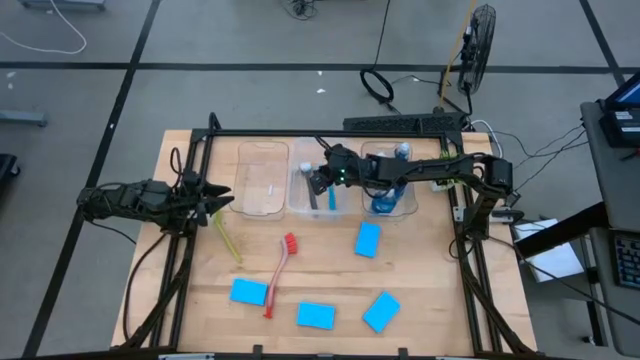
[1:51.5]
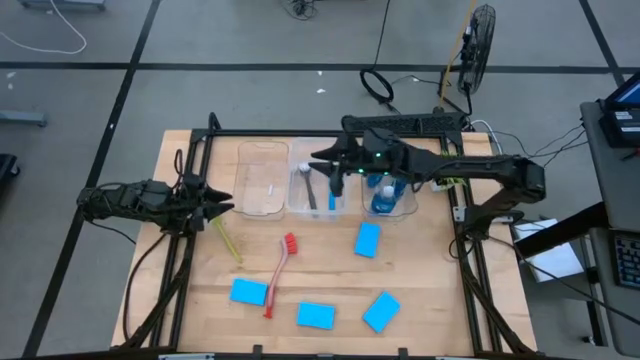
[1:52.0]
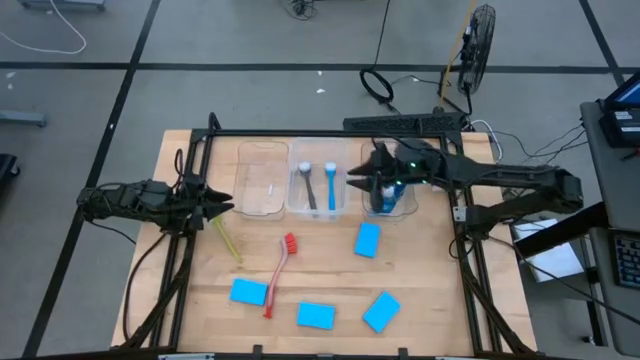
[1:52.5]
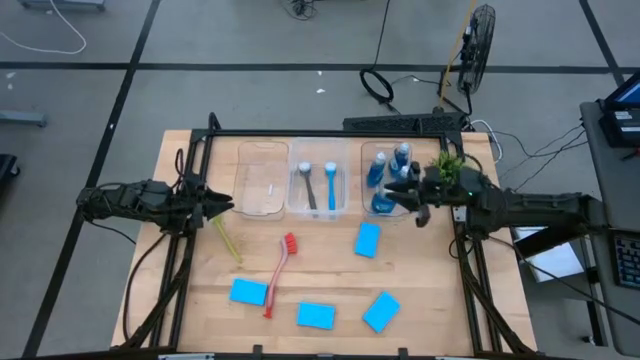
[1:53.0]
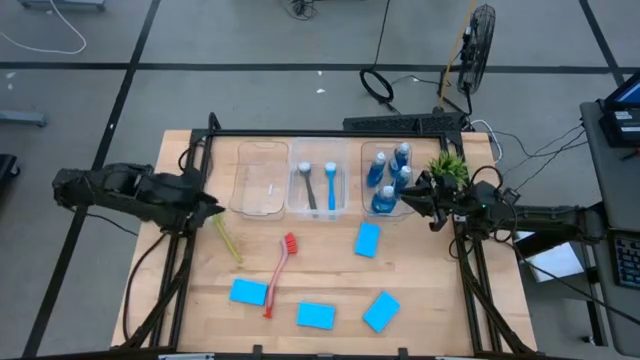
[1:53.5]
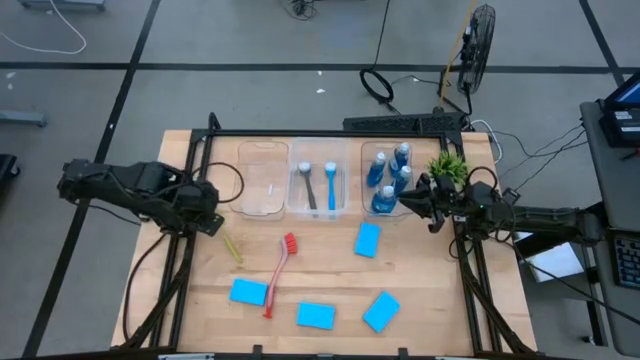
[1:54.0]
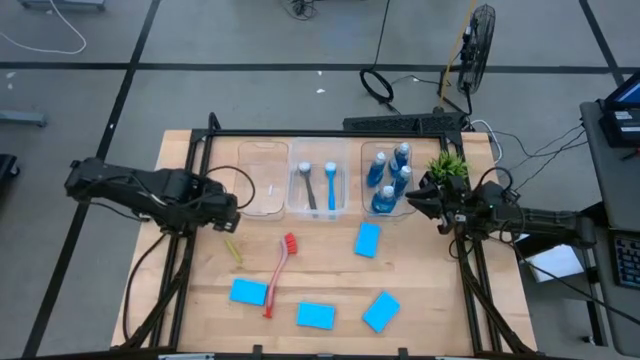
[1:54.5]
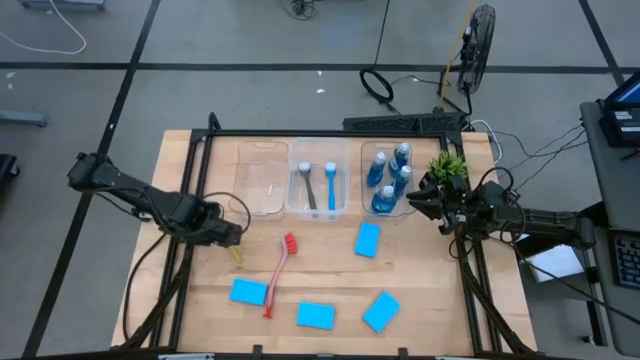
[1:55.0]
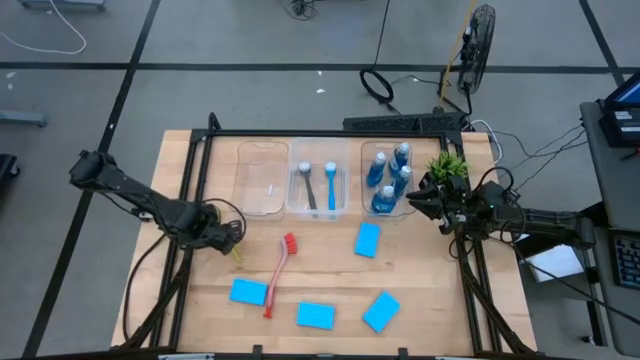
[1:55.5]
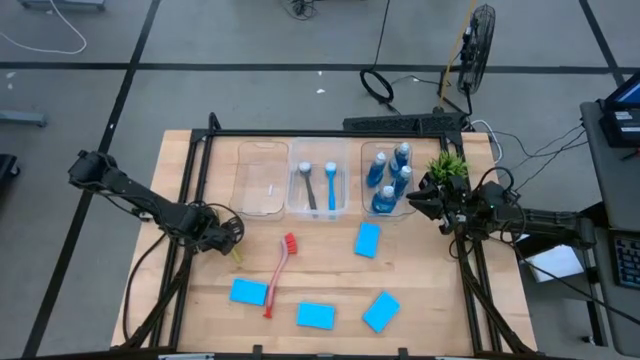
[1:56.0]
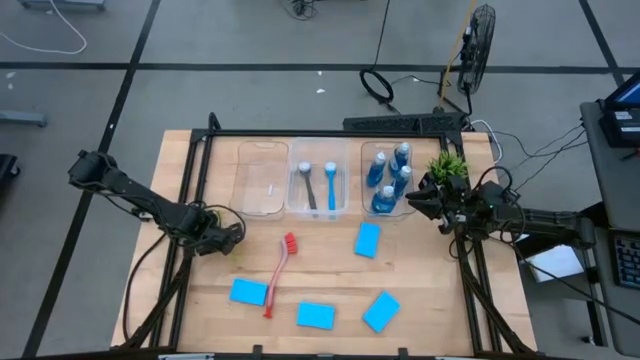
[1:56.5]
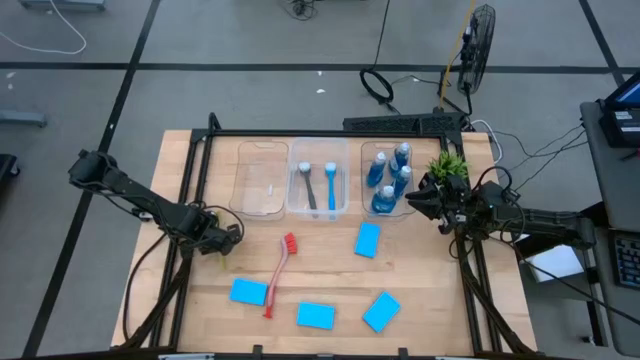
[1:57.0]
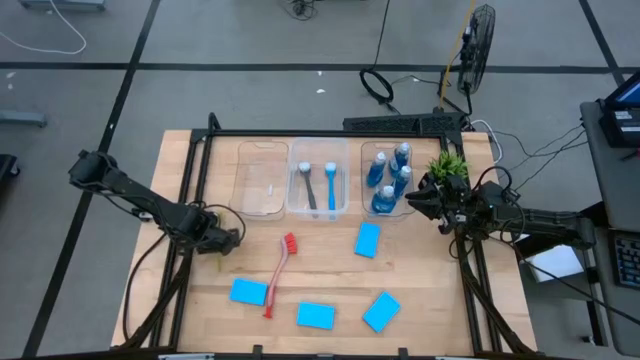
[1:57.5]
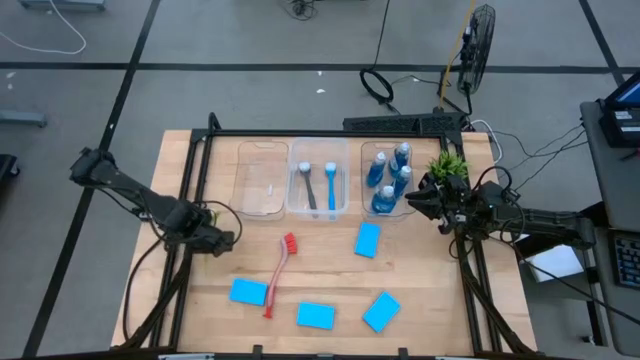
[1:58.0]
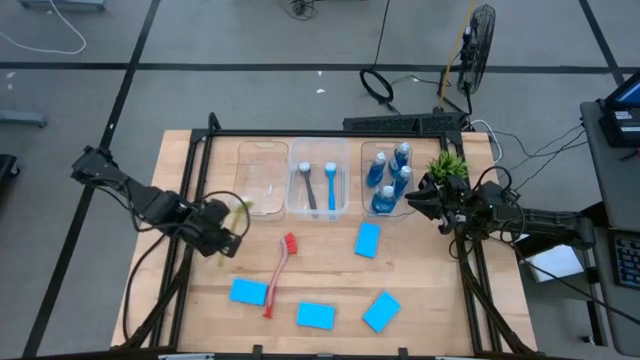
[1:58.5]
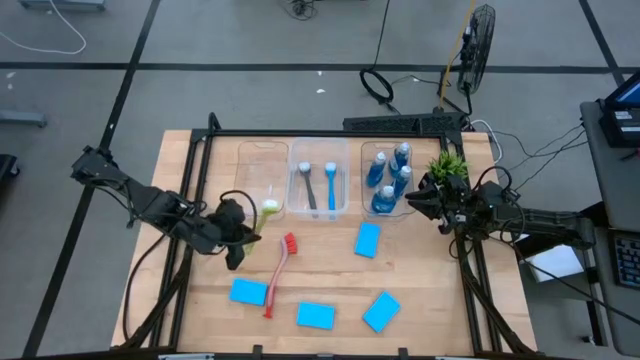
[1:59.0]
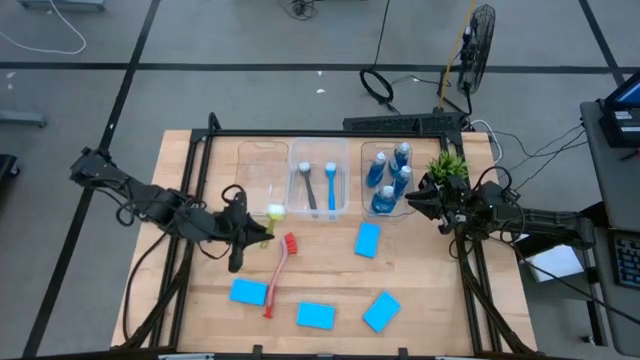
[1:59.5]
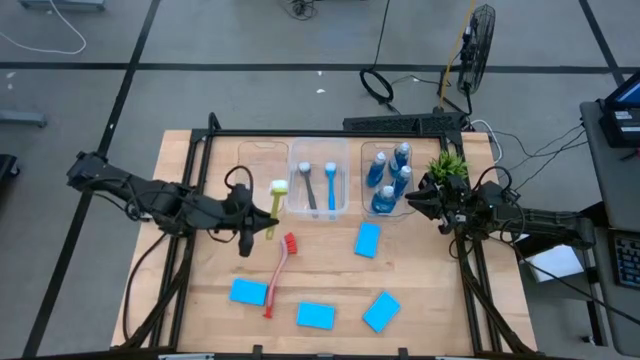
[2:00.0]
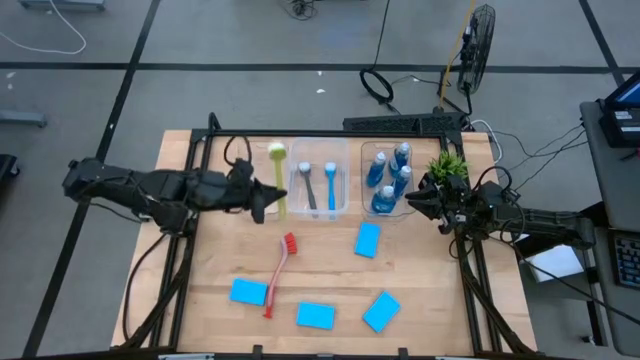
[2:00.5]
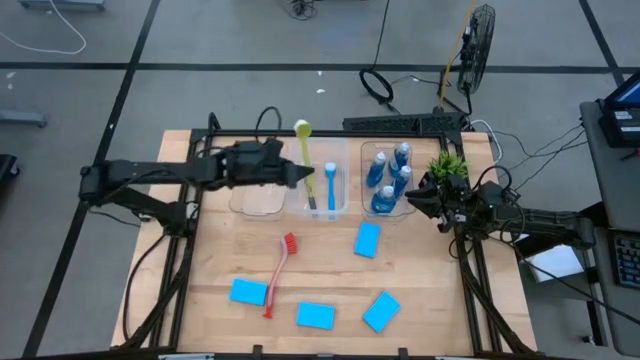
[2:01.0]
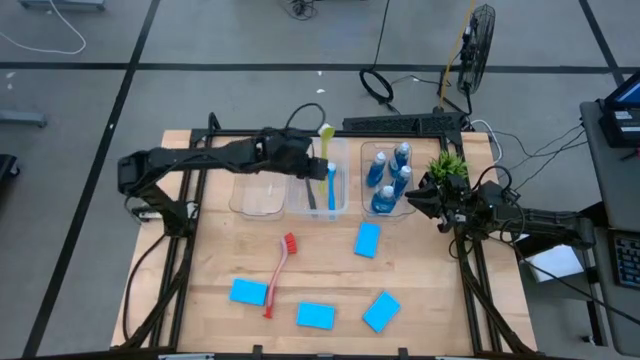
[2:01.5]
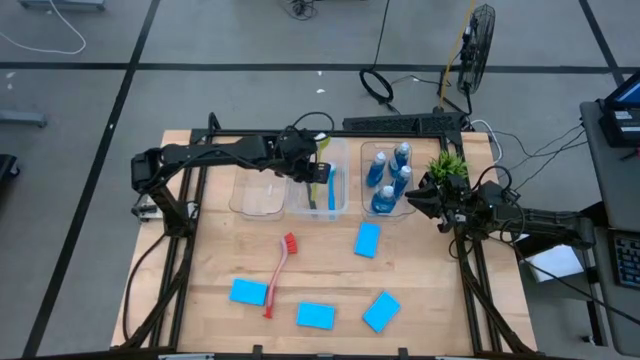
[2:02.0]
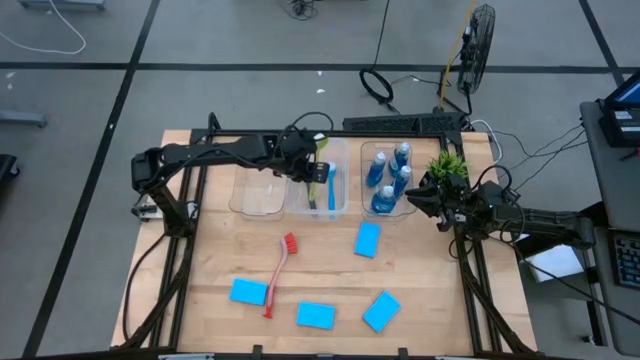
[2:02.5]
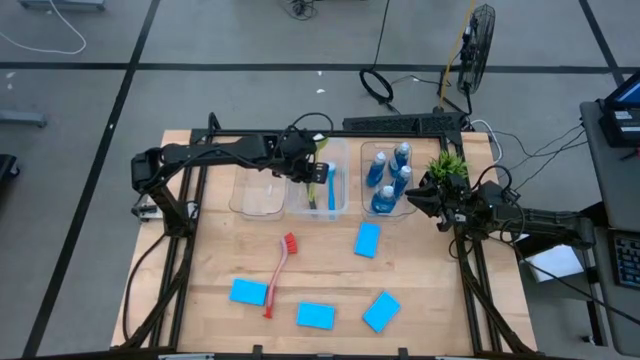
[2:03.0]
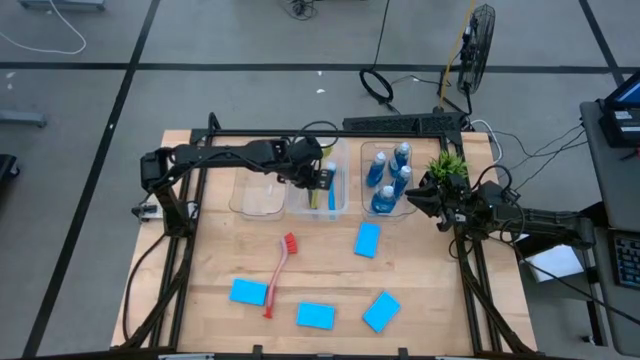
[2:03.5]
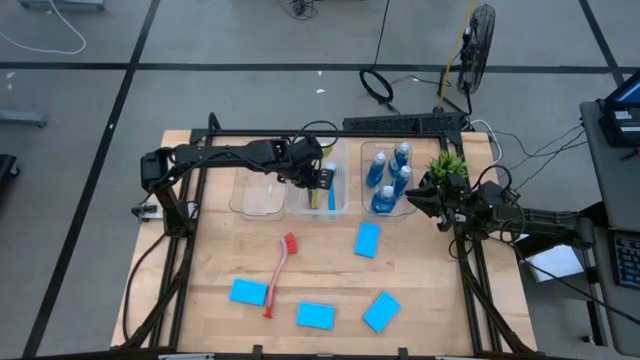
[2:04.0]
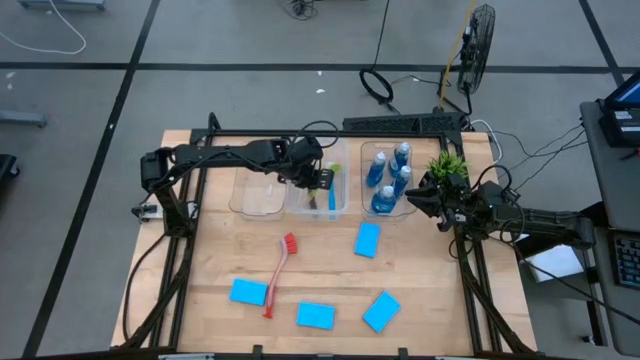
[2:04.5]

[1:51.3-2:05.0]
Task: Pick & Place Kitchen Sink Supplies
Put the yellow green dishwashing brush into the transparent white bin

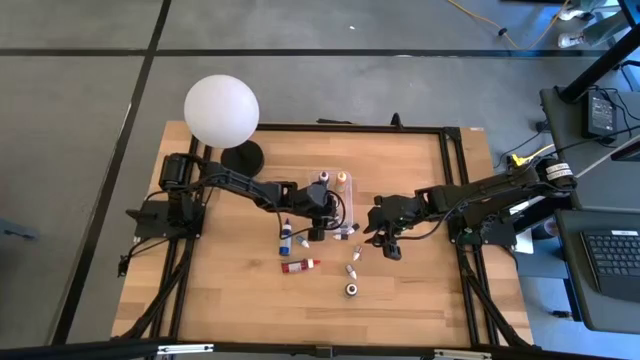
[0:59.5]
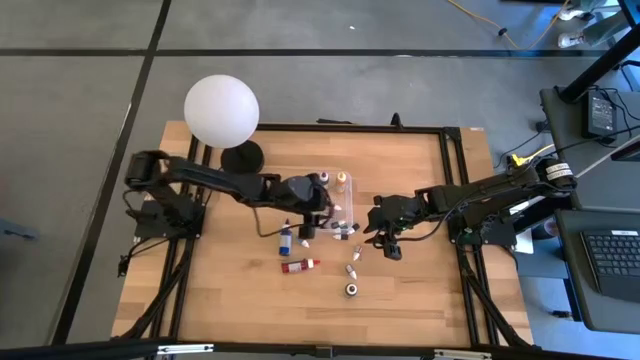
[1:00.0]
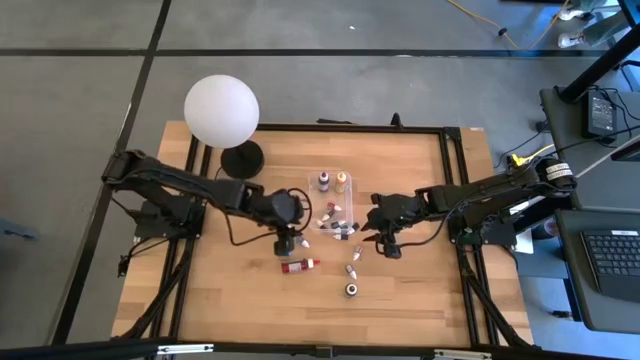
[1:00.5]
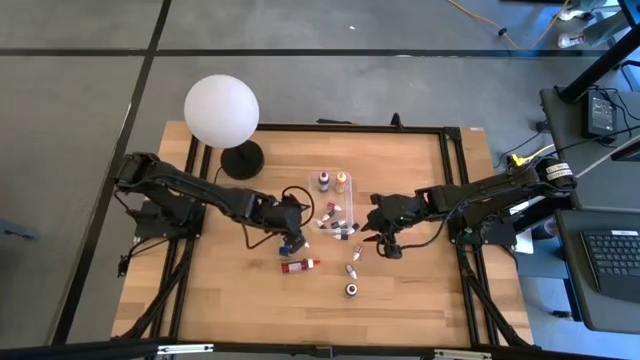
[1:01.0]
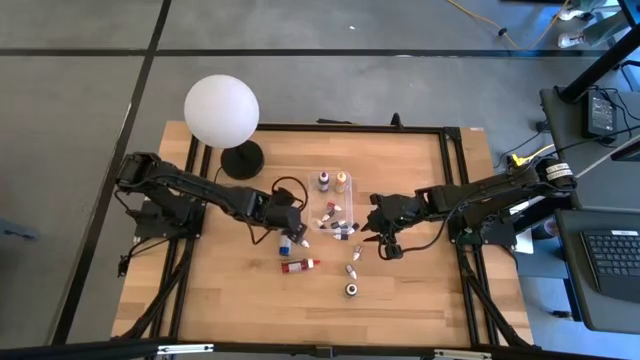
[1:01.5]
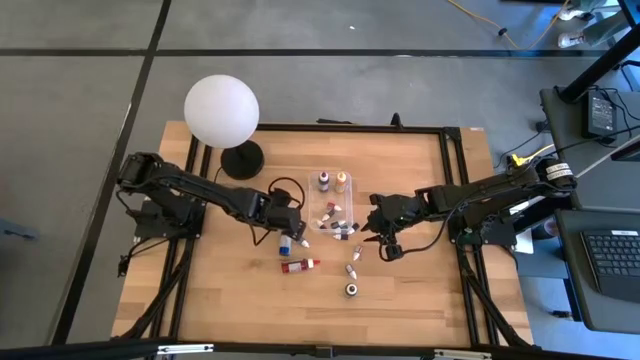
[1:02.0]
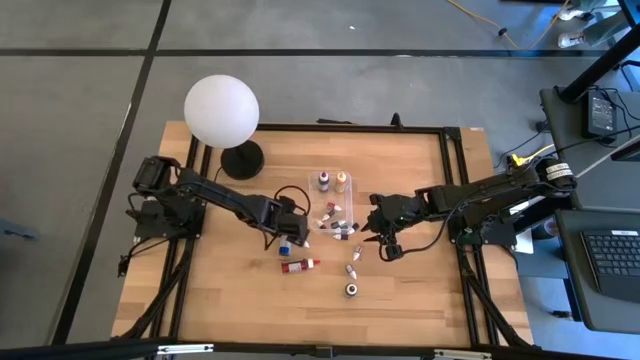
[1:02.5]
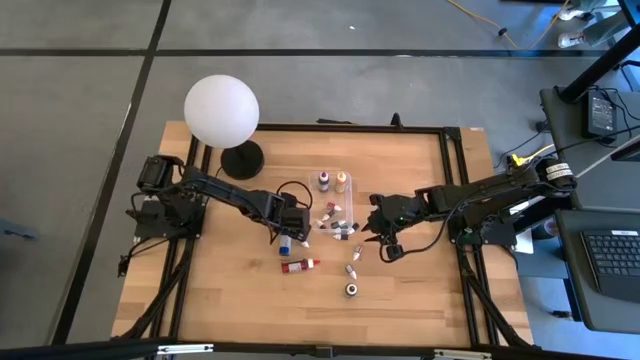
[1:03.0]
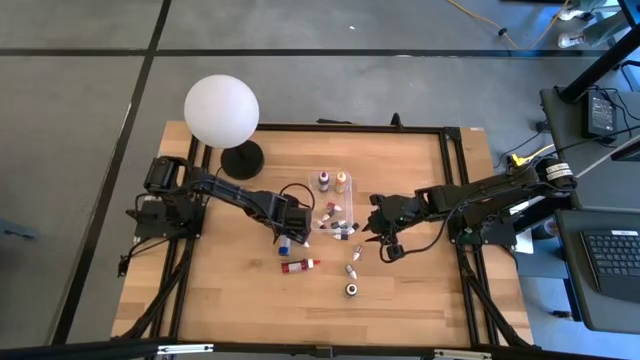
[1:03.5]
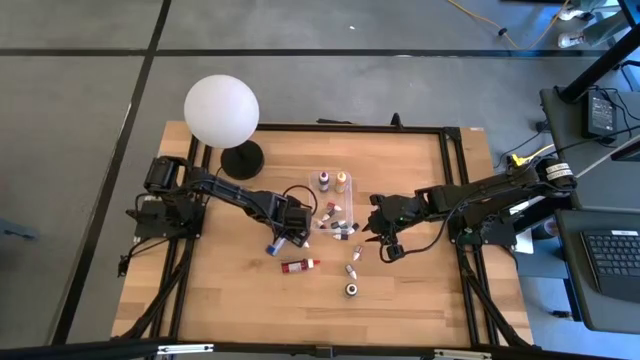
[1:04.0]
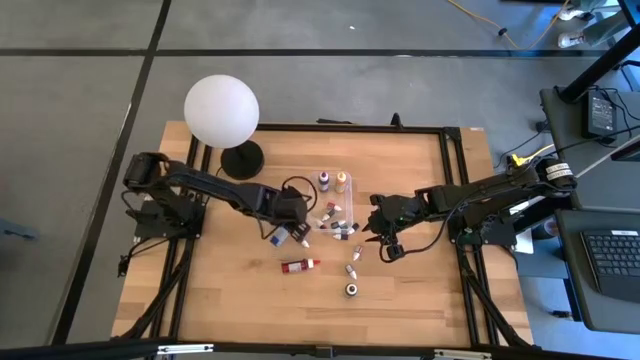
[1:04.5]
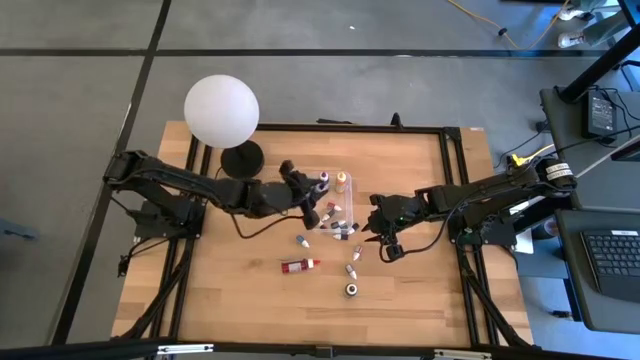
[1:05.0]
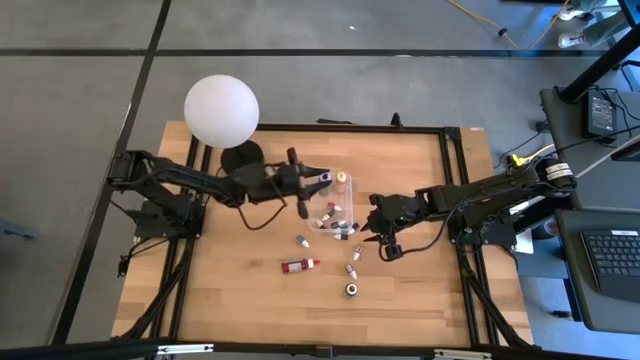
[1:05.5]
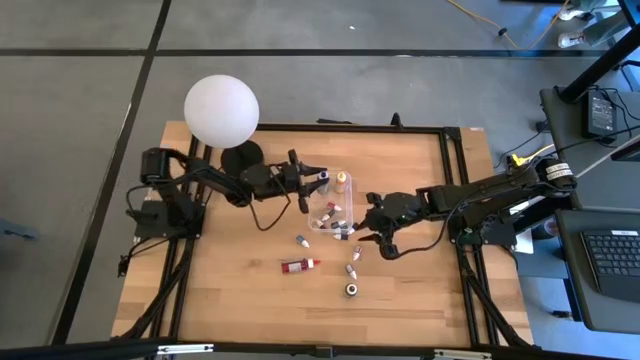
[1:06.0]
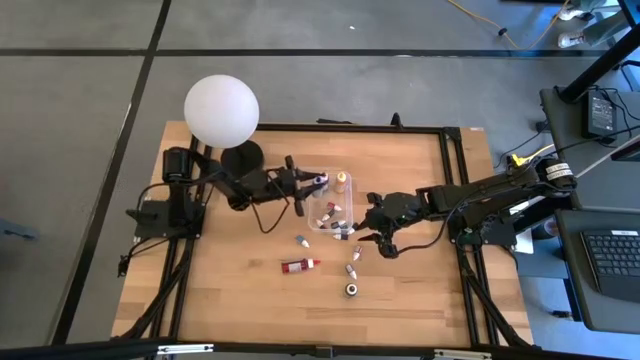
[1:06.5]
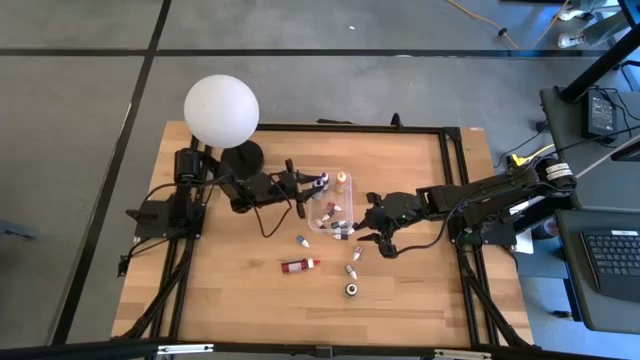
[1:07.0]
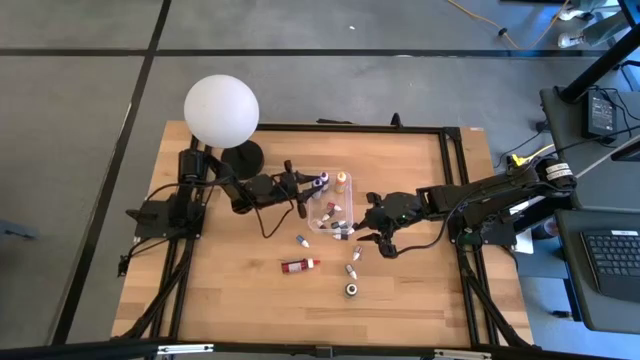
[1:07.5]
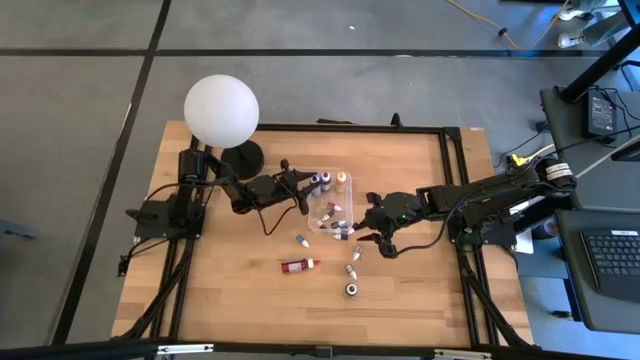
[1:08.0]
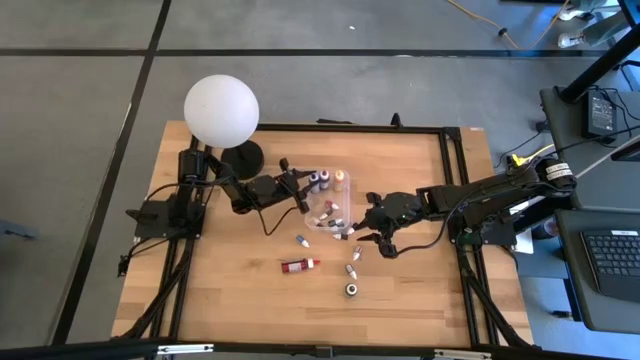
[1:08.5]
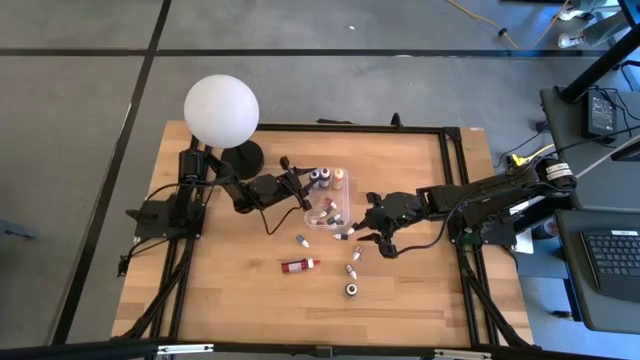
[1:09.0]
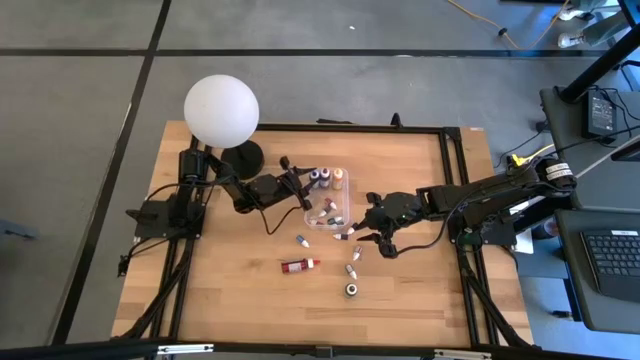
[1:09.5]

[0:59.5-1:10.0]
Task: Pick & Place food coloring
Put the large blue food coloring bottle in the transparent bin
